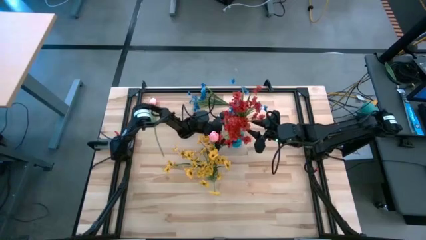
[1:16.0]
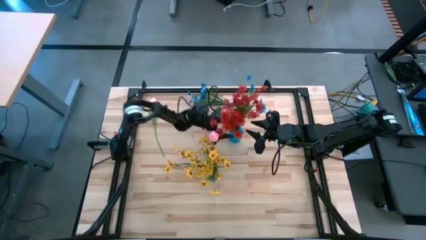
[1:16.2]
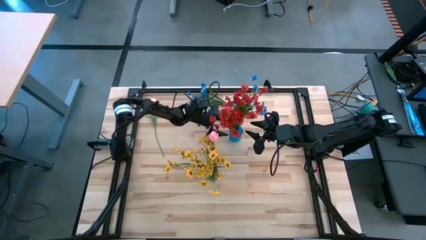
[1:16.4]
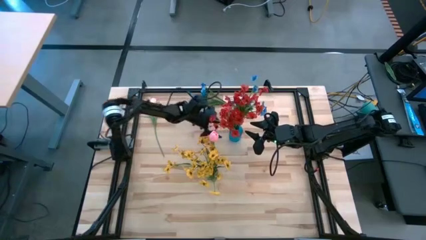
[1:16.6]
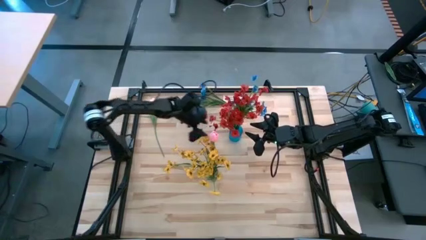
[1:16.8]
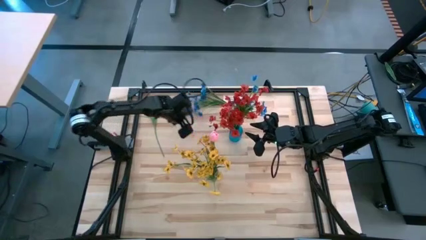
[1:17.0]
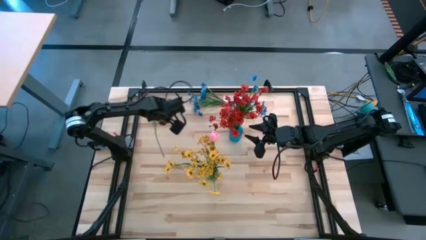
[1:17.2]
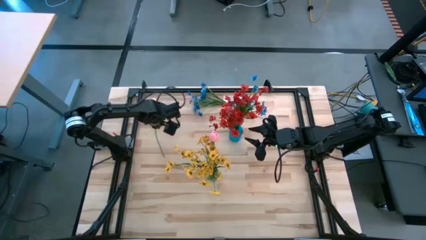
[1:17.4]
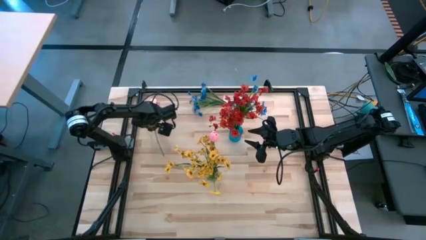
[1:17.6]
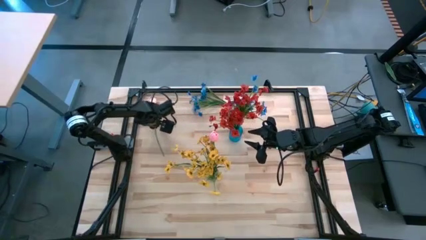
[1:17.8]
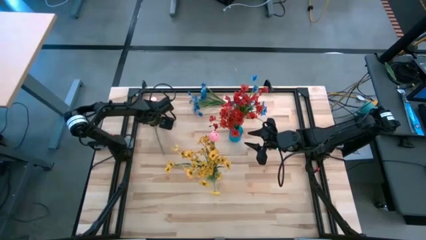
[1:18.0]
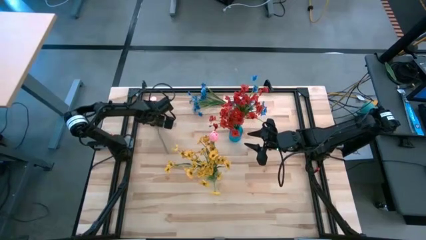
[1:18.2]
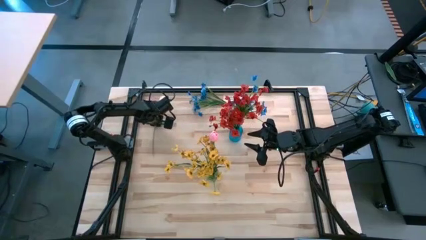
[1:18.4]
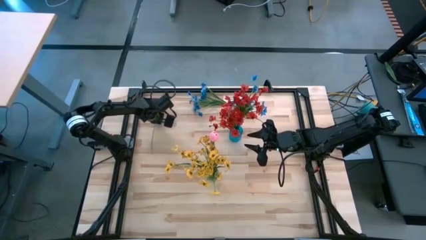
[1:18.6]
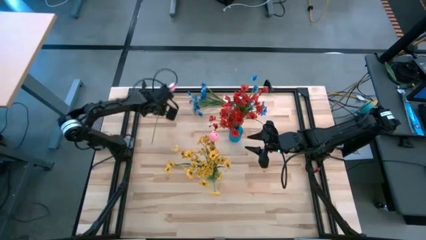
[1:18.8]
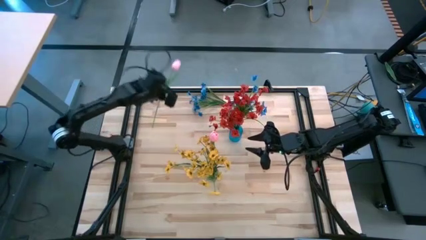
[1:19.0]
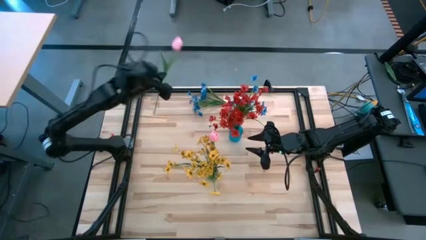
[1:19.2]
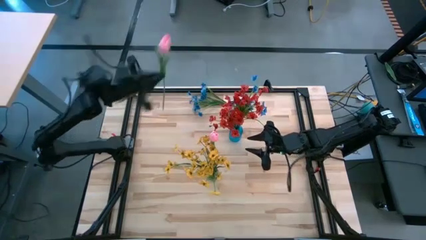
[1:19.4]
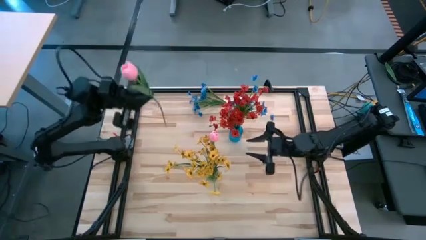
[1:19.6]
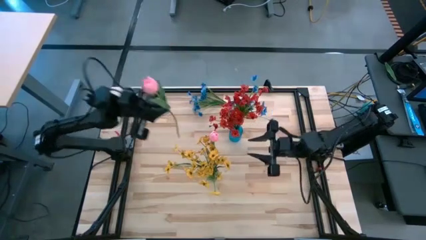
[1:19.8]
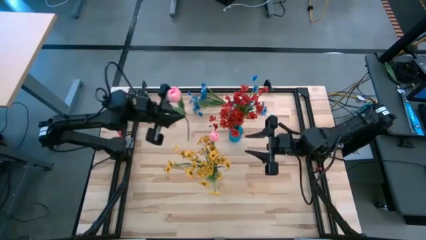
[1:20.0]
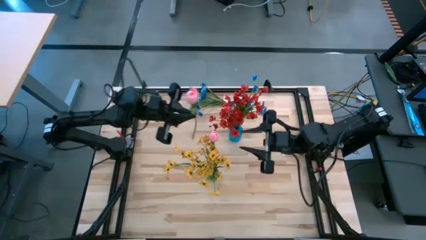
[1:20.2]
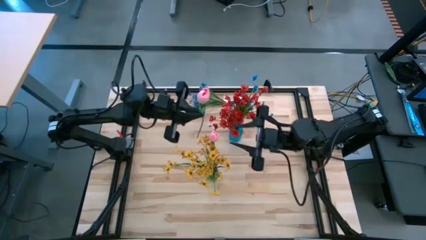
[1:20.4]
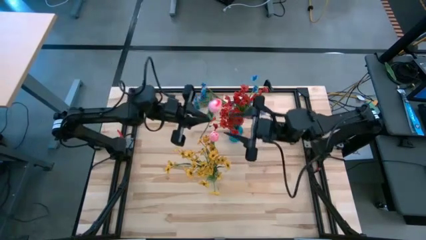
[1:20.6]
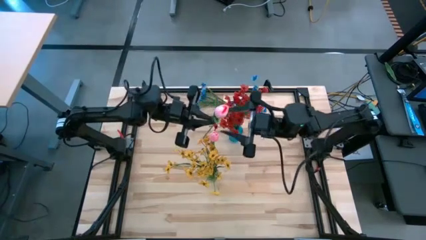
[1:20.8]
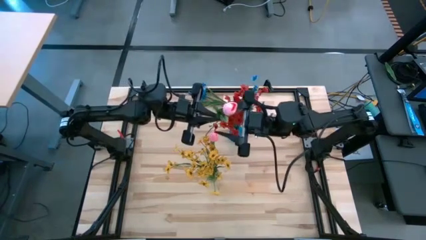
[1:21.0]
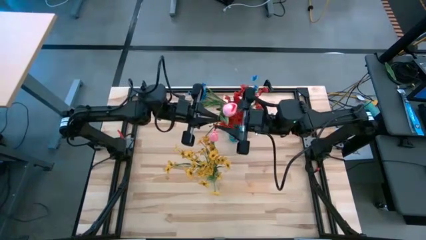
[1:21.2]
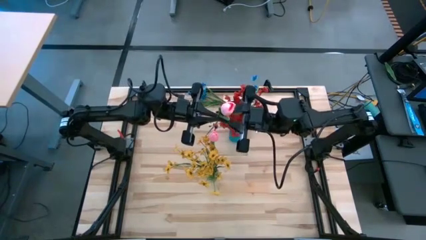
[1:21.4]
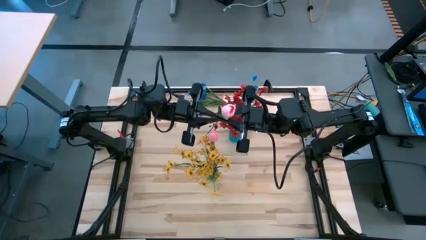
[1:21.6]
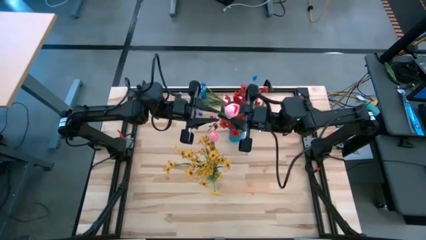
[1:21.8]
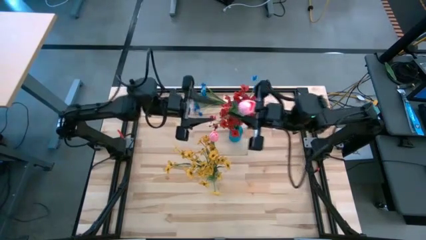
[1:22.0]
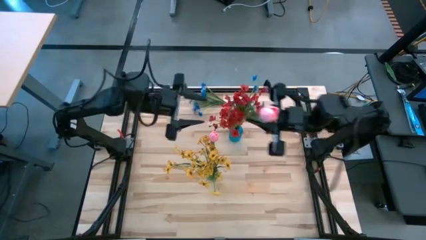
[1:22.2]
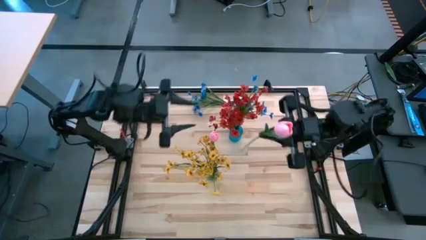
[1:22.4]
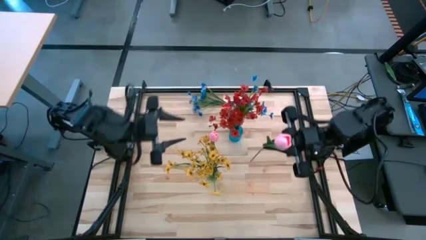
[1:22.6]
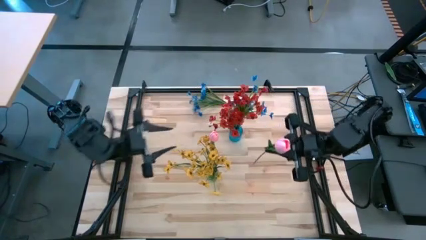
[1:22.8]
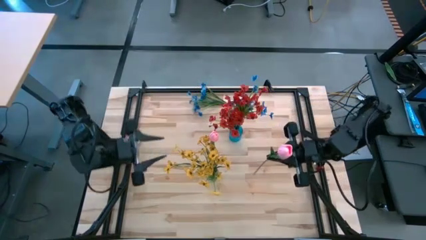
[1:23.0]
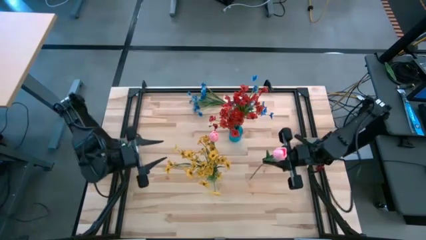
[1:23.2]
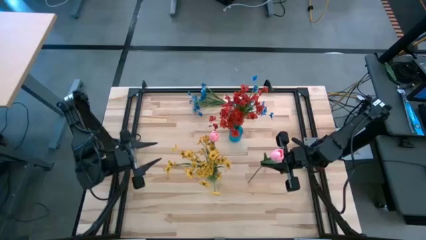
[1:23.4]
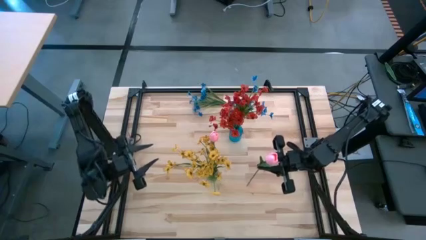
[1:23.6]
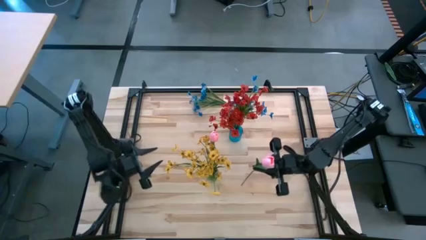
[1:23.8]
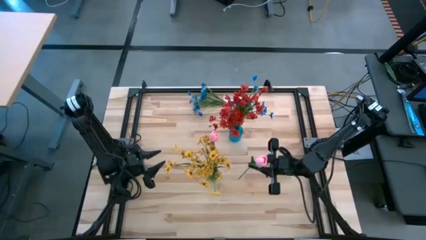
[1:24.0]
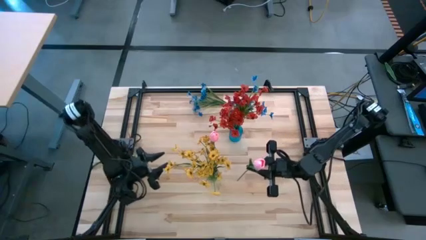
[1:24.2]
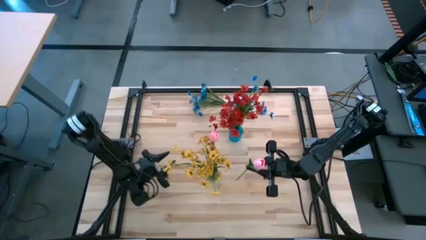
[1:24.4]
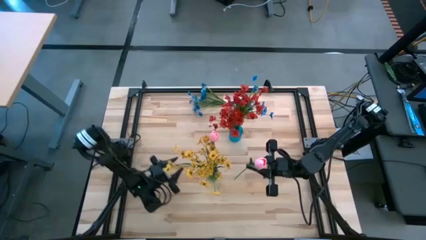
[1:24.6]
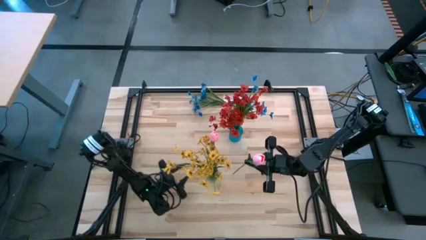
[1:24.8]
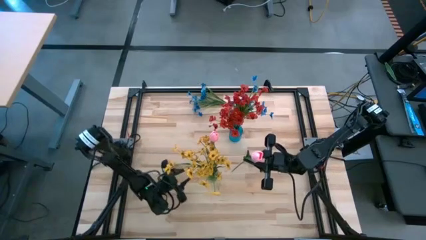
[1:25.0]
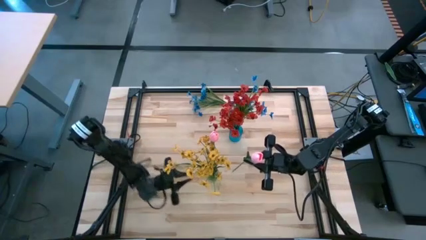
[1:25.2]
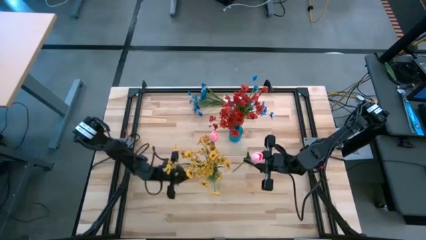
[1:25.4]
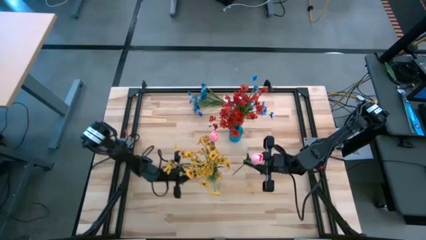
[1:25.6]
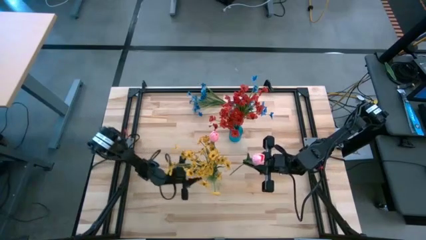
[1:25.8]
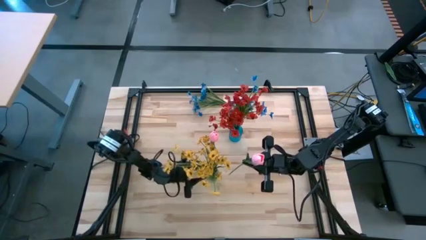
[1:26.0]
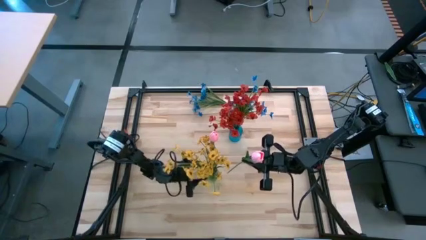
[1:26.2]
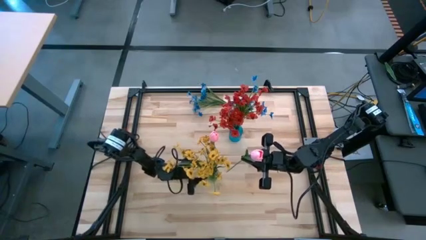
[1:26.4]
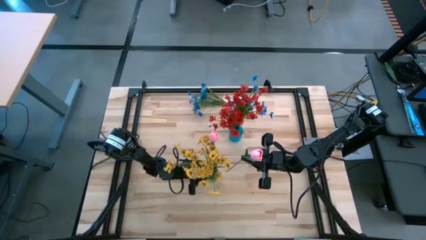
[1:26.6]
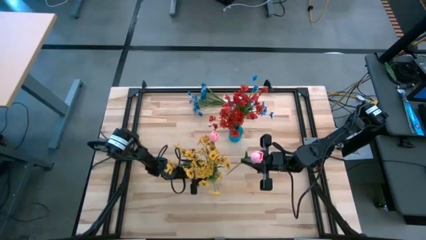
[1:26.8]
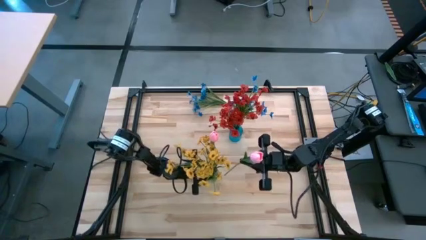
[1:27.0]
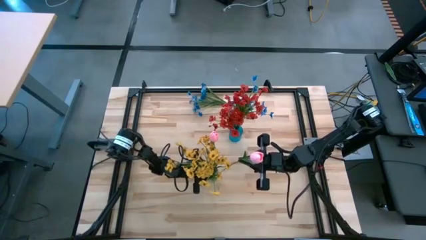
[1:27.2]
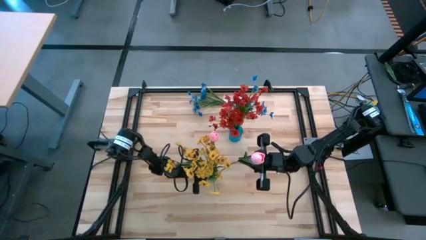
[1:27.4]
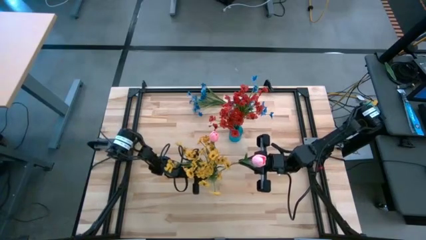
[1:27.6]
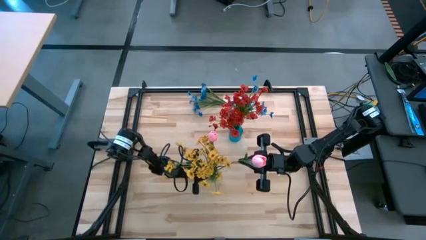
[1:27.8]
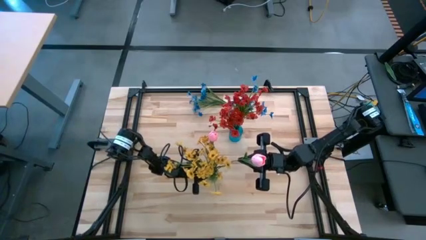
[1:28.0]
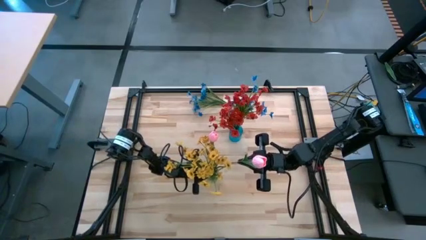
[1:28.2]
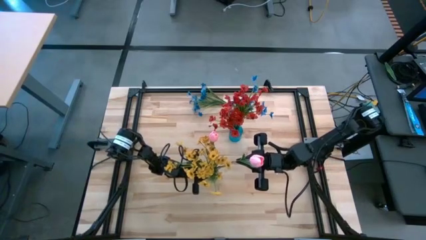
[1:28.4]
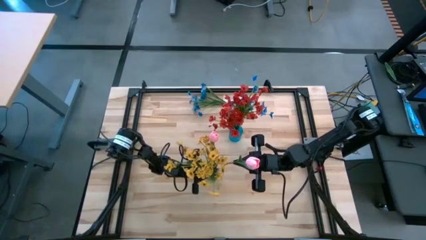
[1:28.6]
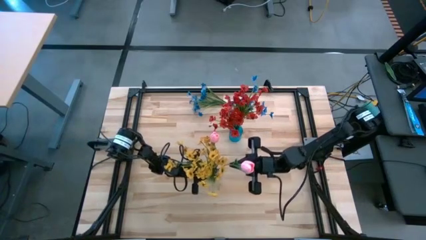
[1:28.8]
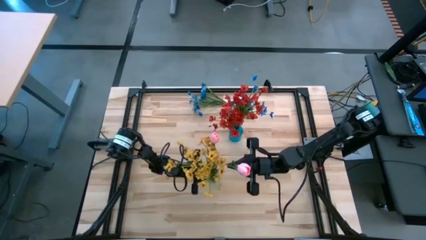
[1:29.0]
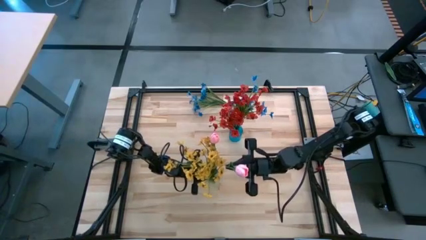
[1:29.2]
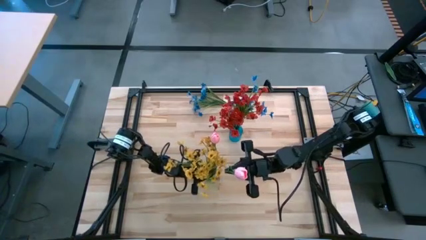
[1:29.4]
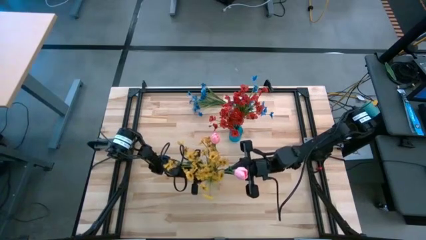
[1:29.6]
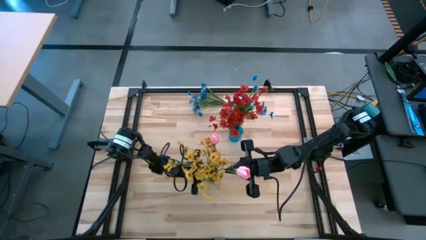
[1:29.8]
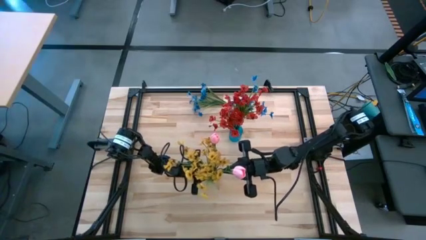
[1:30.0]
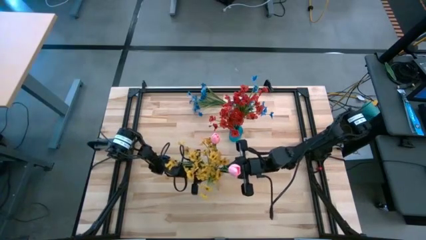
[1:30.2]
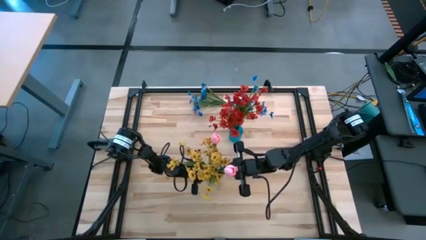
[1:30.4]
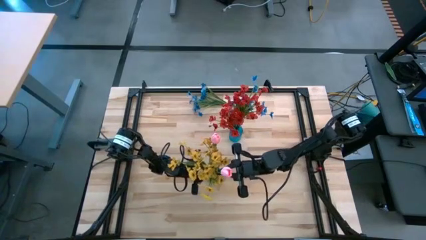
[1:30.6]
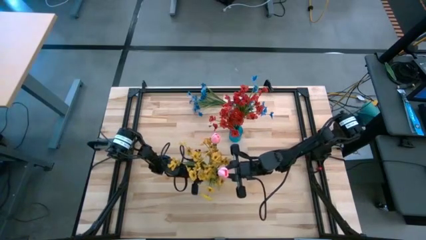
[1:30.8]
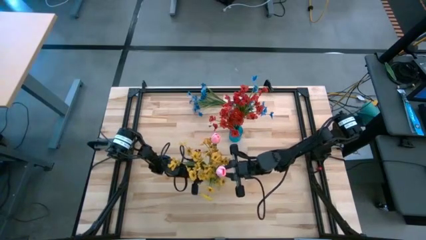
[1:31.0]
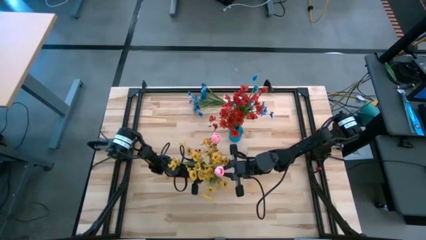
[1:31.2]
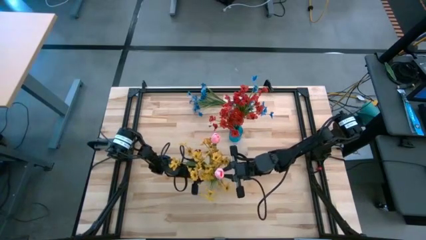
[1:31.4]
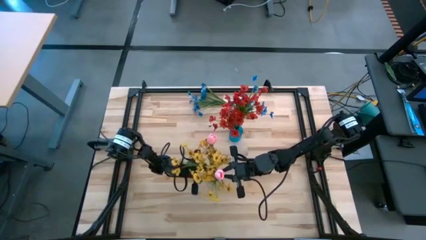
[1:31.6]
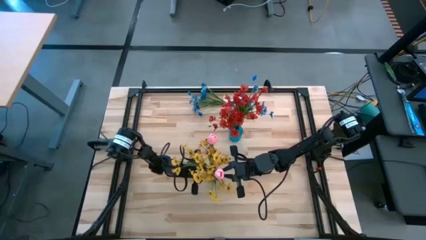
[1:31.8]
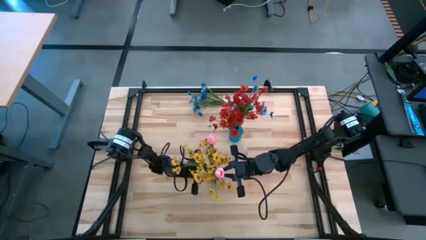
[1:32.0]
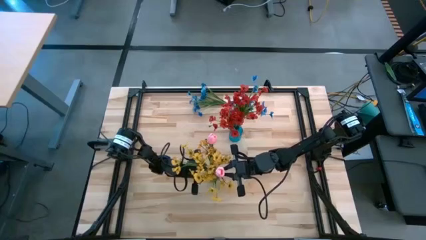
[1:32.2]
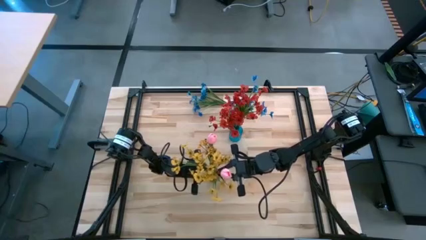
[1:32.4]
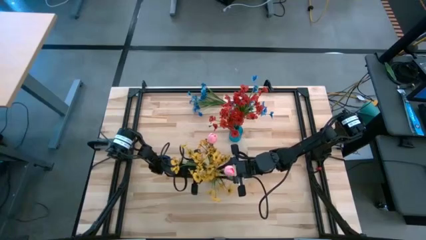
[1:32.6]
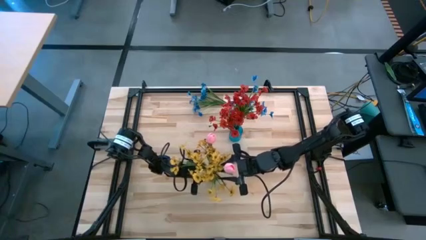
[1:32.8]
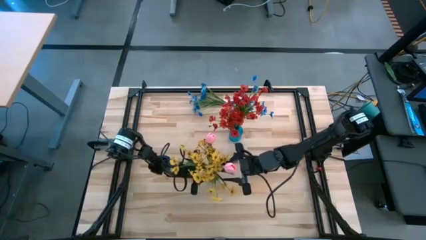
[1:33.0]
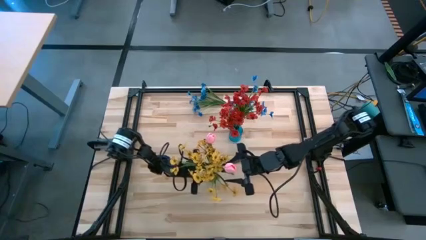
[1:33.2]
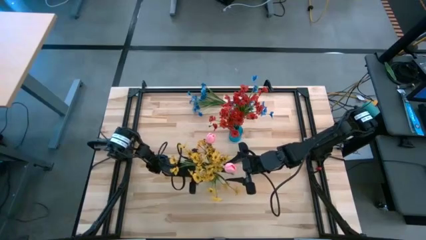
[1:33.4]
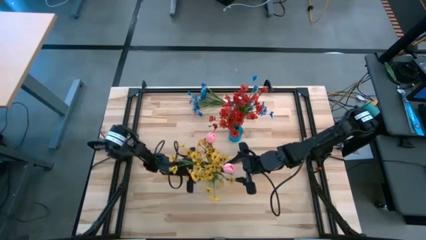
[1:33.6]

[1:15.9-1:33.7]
Task: Sort flowers into vase by color
Put the pink tulip into the green flower vase
